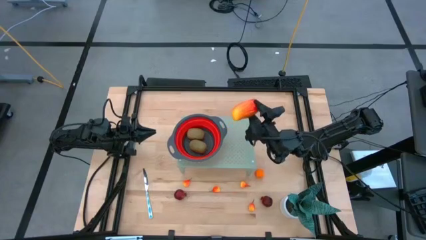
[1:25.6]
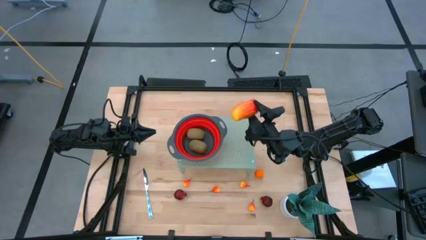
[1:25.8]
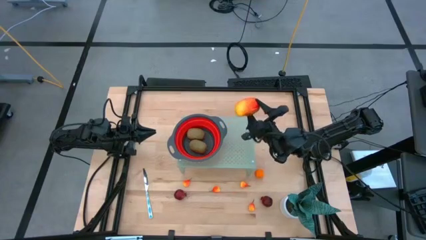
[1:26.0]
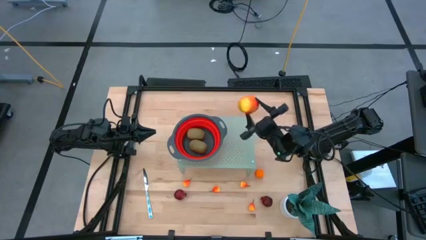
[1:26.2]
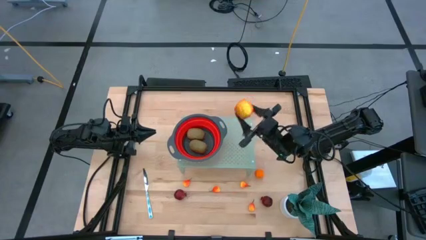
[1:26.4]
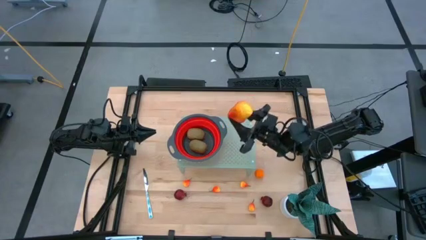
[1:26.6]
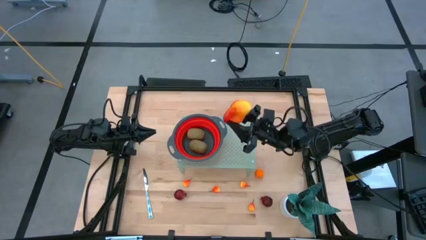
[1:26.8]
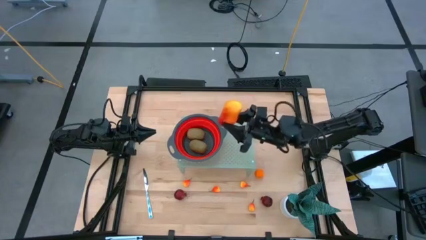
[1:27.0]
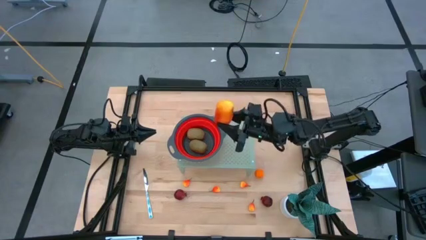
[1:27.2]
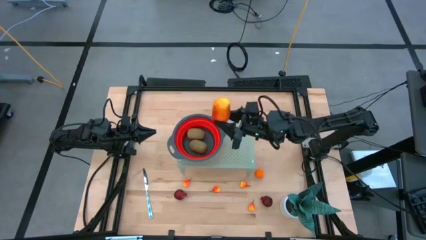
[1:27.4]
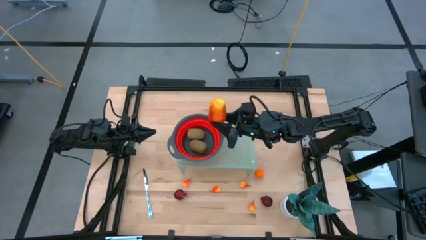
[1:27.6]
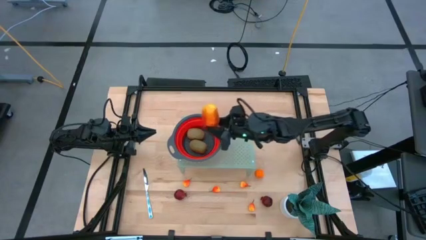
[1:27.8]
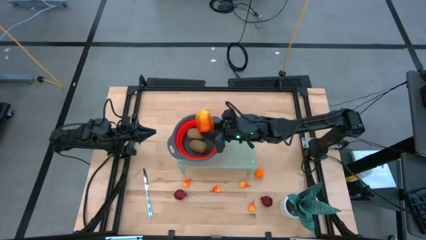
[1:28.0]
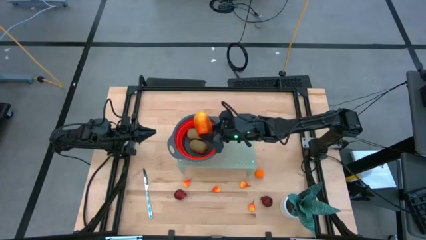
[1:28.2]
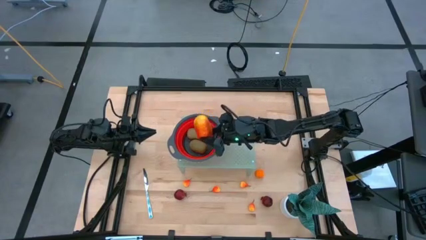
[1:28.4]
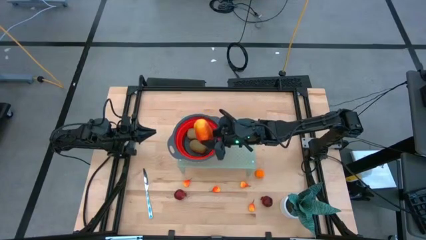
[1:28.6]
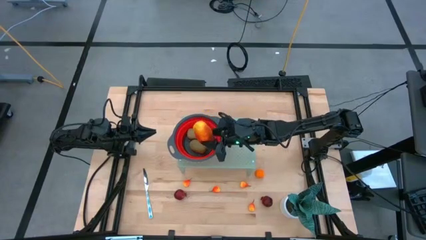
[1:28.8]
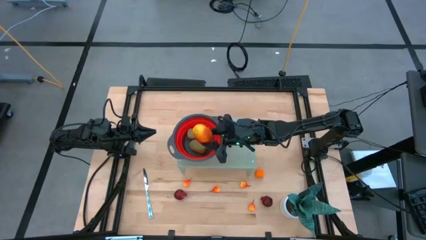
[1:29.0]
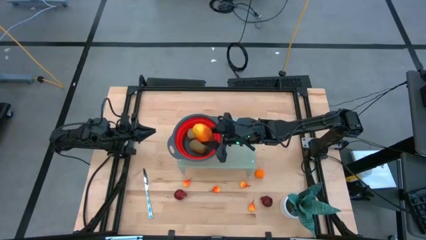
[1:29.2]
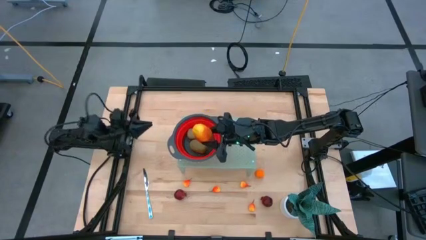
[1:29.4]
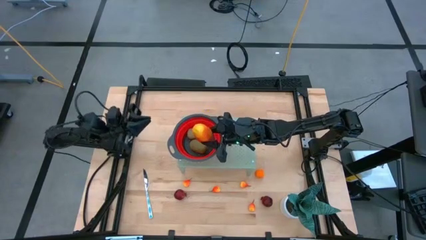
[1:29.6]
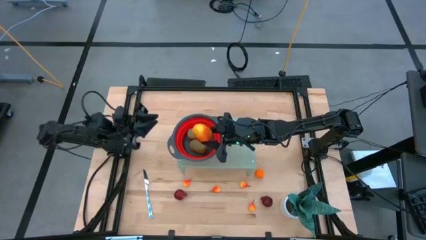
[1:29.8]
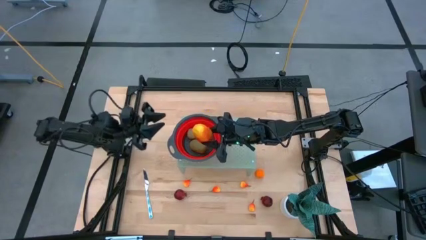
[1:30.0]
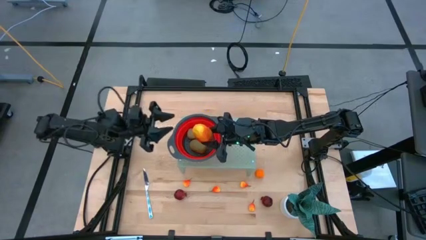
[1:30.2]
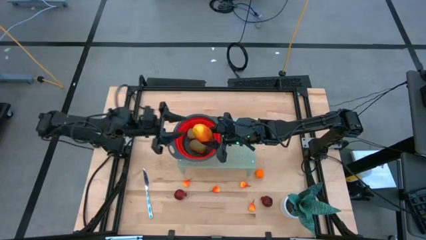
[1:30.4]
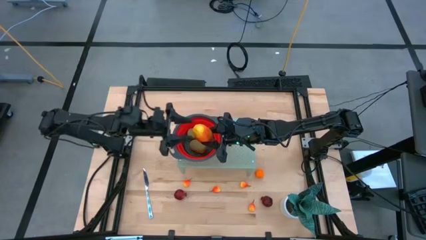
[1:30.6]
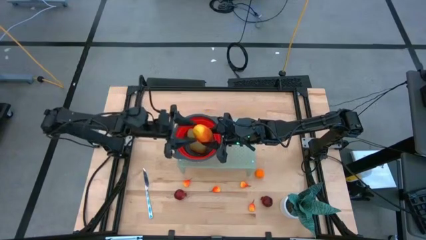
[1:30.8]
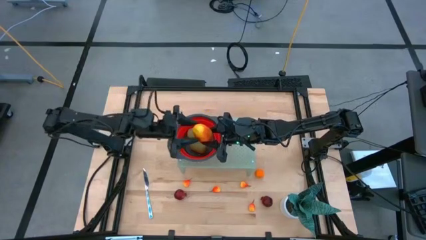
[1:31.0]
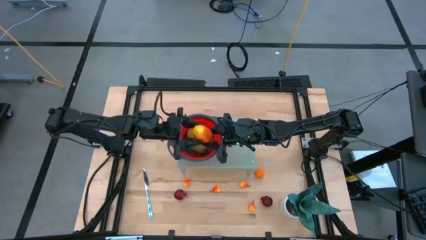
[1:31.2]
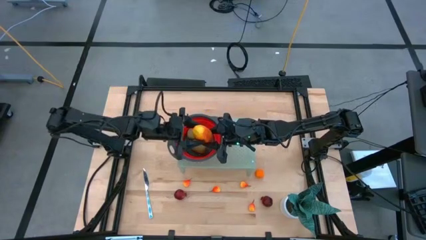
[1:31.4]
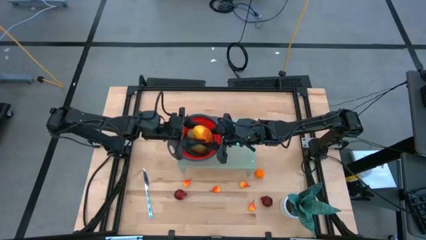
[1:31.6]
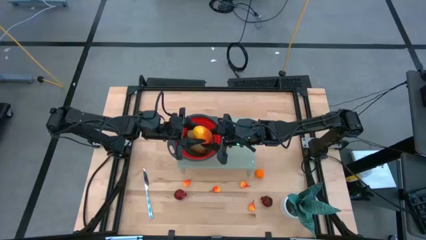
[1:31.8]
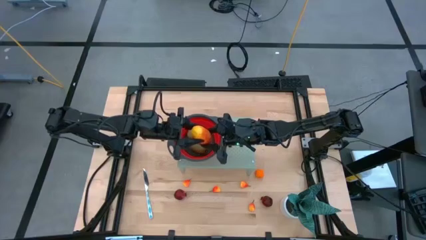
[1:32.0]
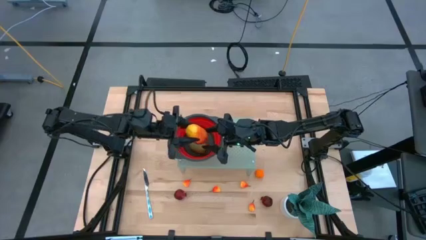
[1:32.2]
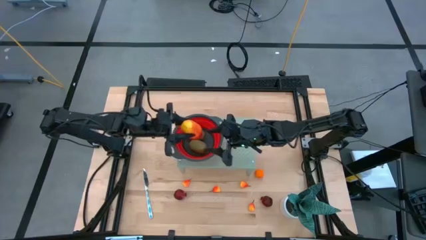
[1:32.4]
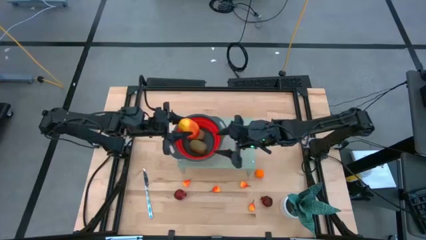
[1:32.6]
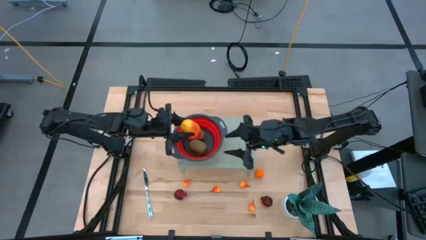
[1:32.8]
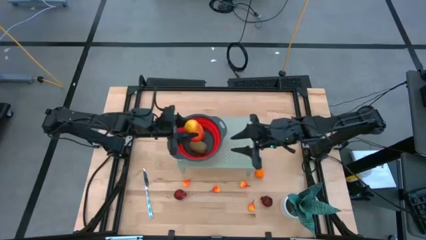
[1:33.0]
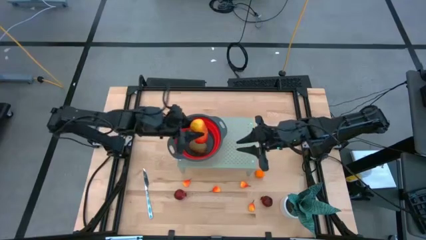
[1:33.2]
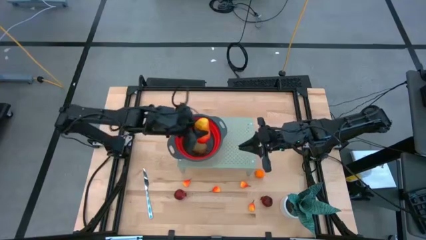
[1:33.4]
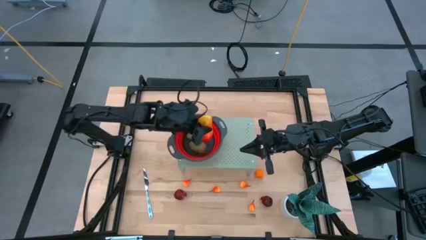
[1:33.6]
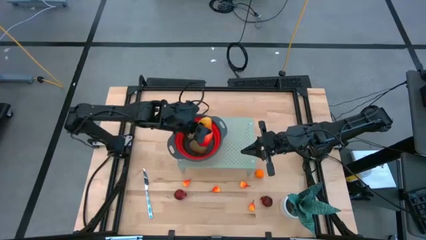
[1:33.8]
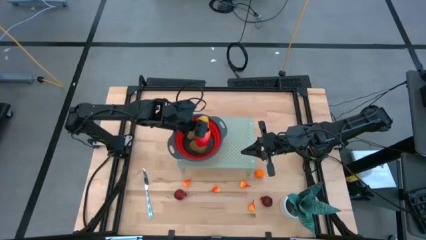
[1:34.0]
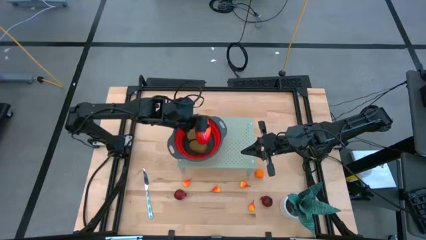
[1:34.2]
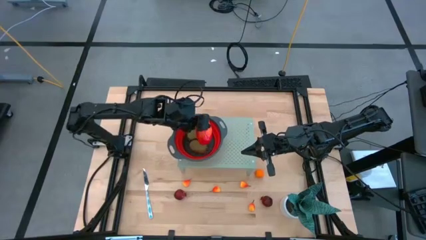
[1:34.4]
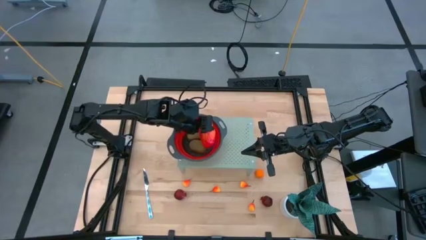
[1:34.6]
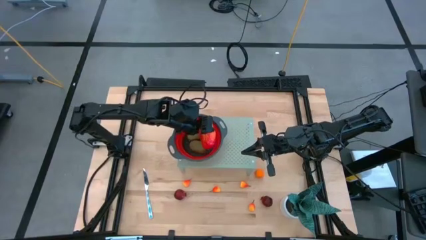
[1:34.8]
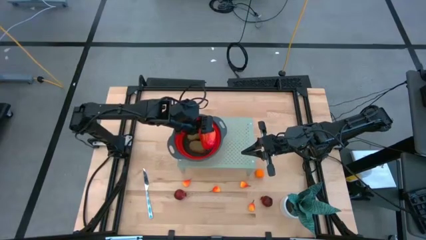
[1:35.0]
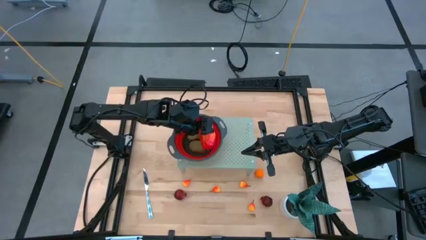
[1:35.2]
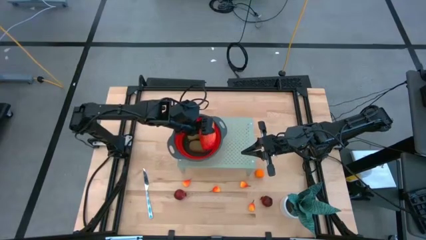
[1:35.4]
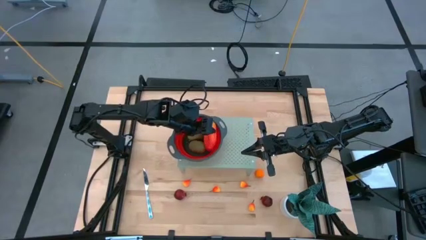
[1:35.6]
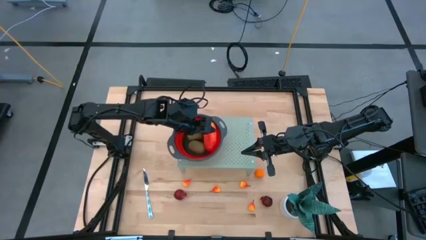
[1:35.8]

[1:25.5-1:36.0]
Task: Pick & Place Fruit
Put the mango fruit into the strainer

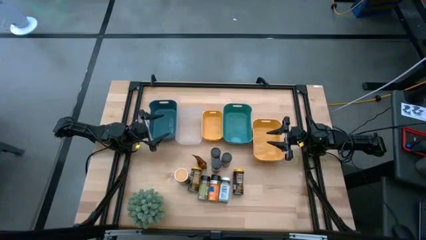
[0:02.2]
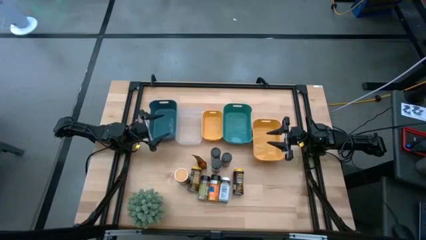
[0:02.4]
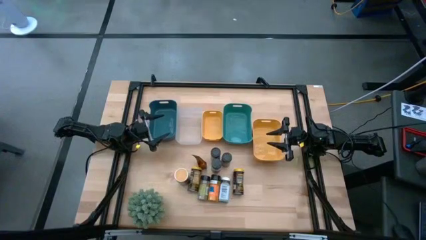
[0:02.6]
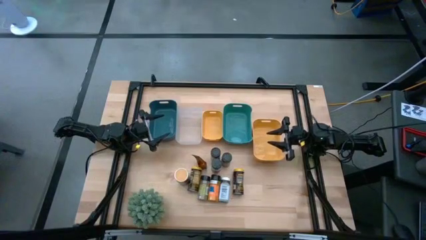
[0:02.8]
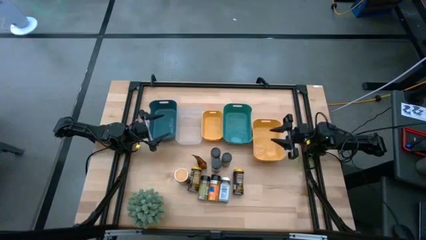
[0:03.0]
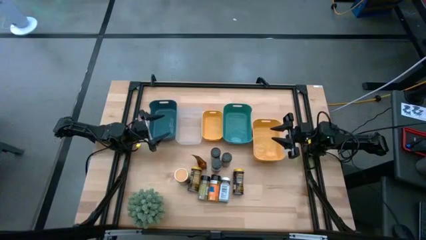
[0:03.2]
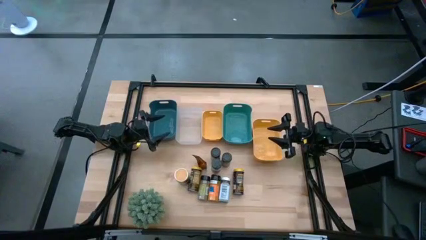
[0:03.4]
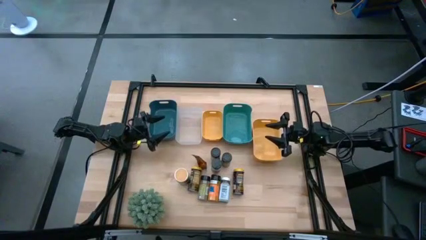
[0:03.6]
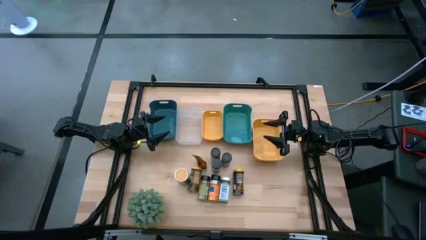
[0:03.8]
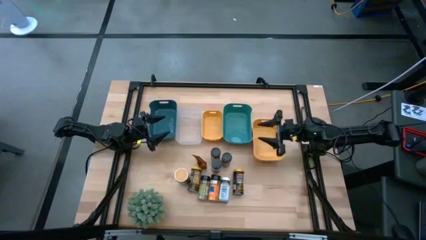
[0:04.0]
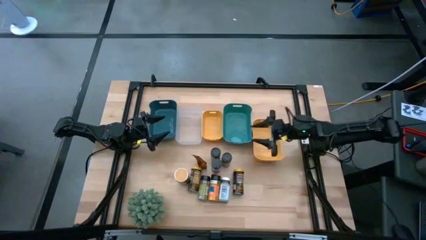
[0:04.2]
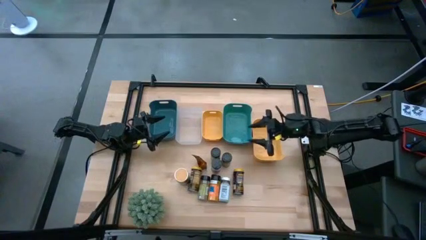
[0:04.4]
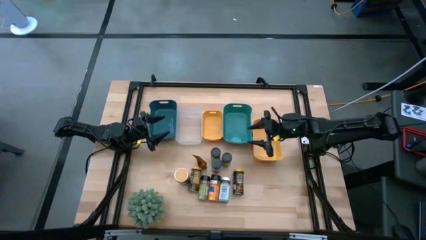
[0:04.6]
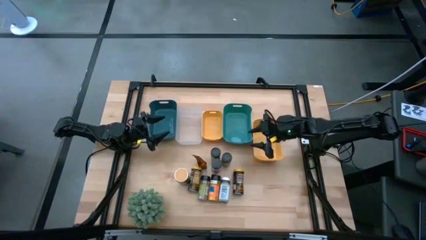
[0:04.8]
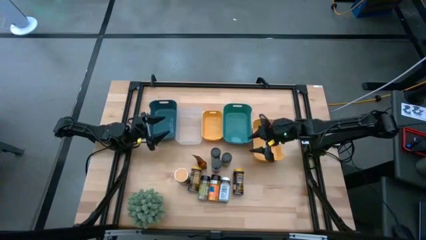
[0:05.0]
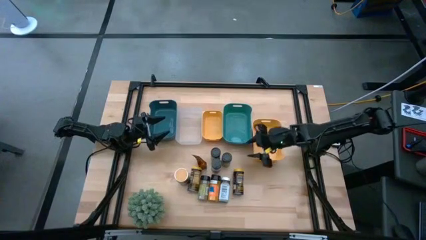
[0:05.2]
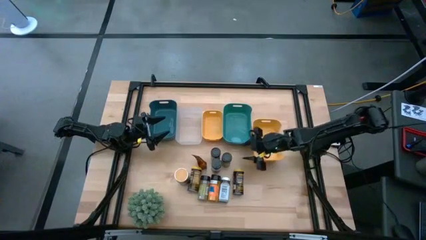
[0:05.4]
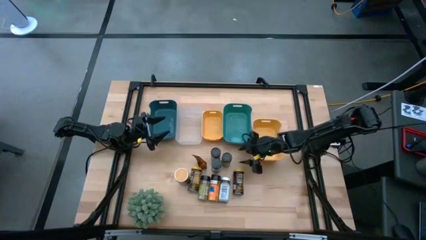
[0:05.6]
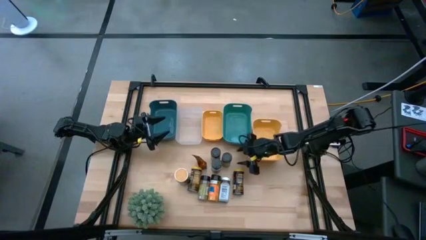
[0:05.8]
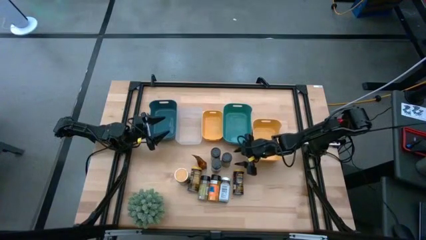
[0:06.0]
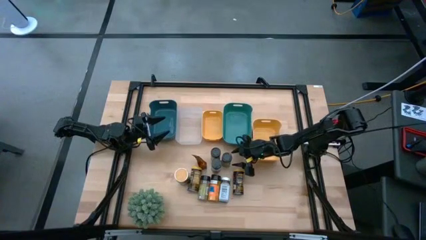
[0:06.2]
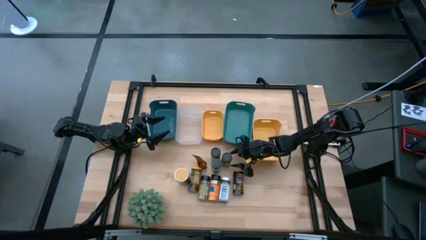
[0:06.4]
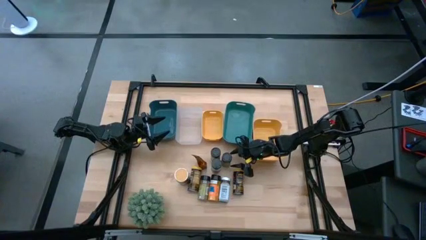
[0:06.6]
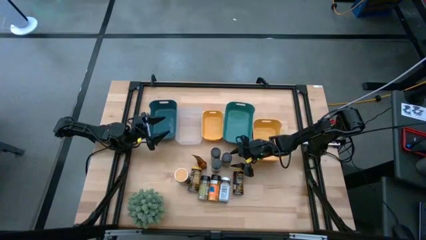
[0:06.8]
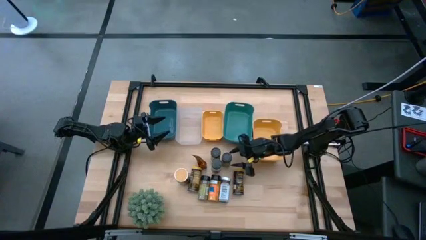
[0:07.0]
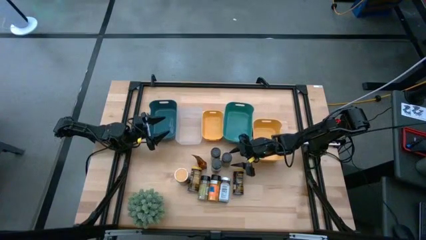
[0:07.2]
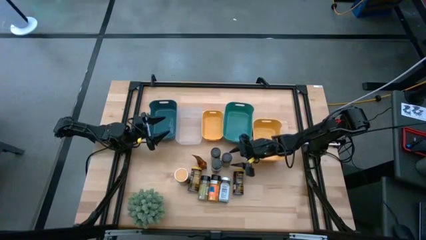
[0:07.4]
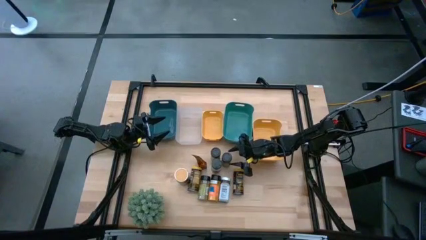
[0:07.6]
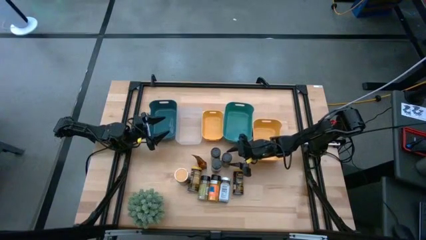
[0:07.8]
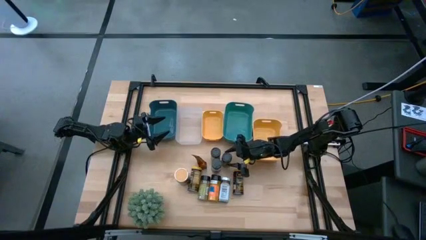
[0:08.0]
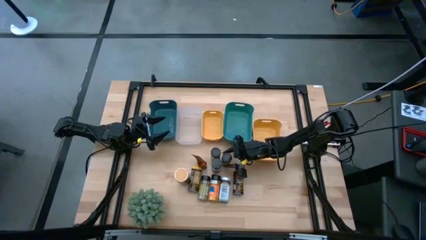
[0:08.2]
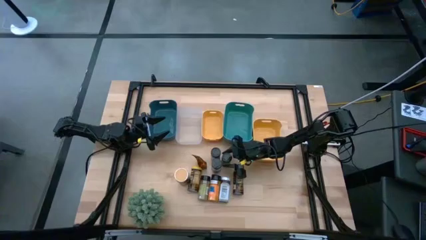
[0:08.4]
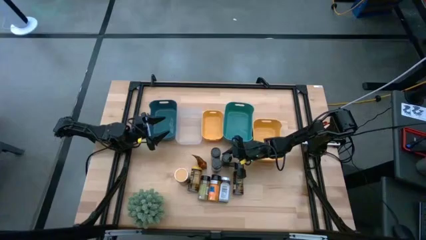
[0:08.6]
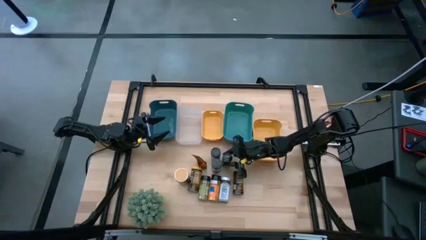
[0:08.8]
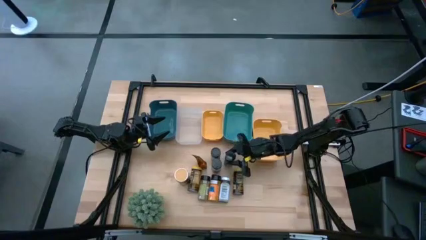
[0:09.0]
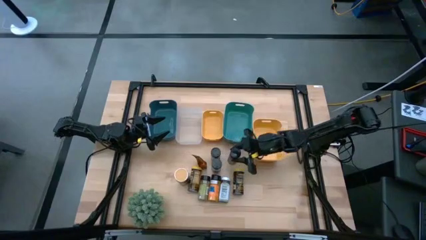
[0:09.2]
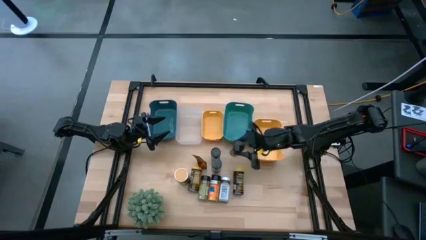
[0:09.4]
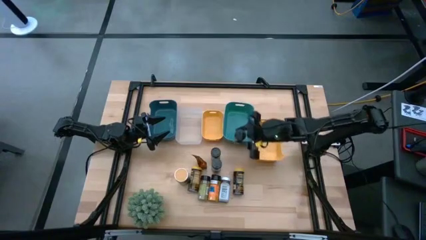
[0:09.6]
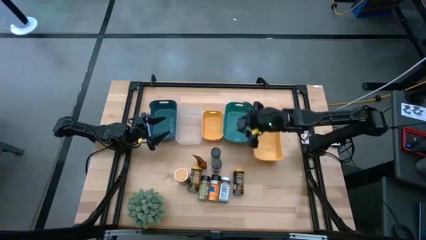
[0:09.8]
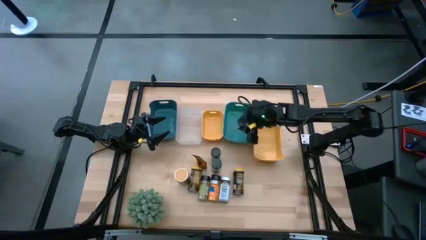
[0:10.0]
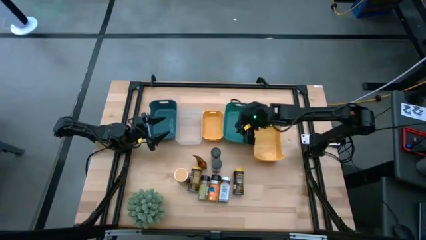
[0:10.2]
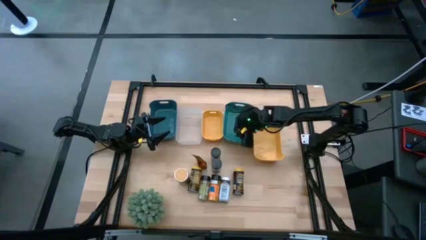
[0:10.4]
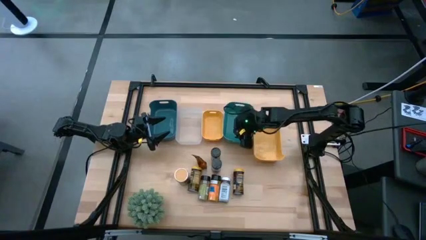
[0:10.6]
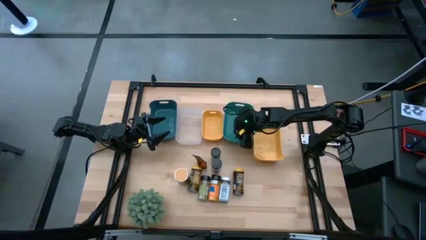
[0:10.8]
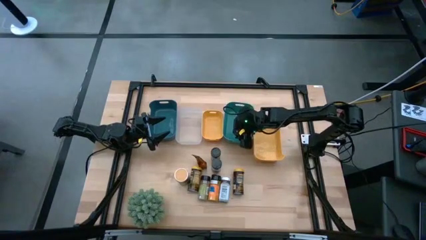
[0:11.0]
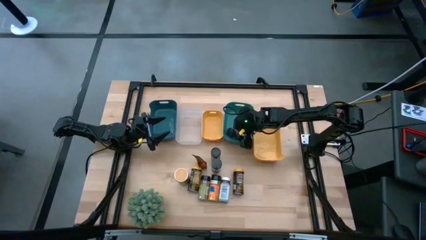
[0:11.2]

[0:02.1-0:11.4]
Task: Sort spices by type
Put the black seasoning bottle into the green bin
